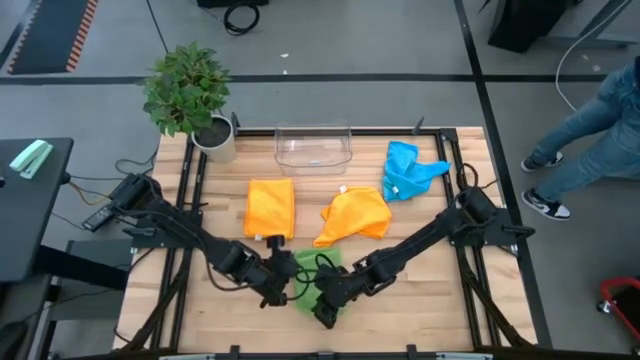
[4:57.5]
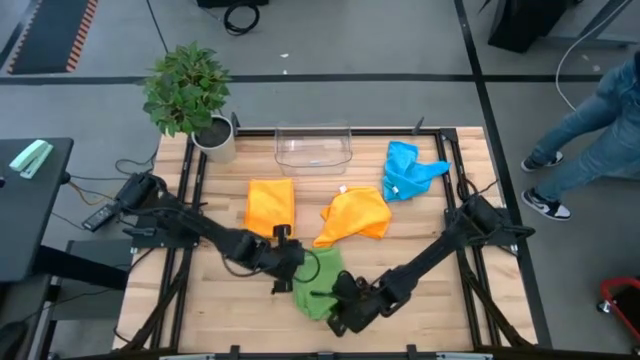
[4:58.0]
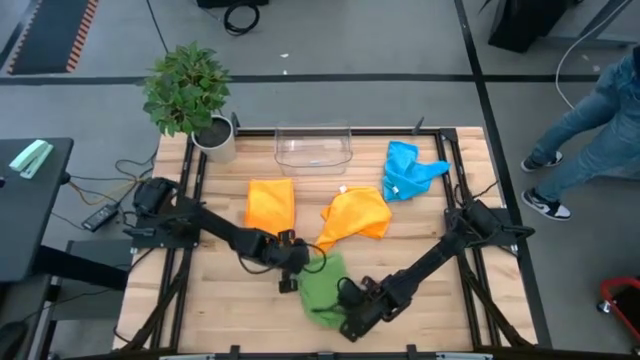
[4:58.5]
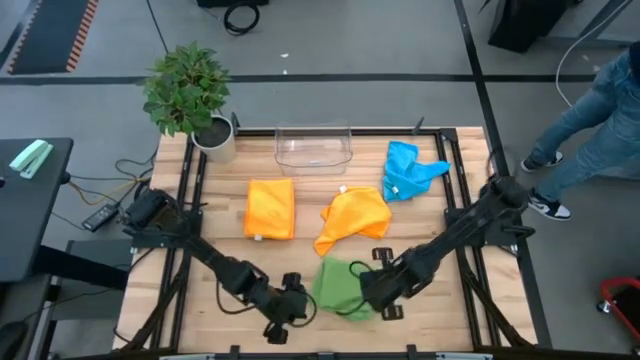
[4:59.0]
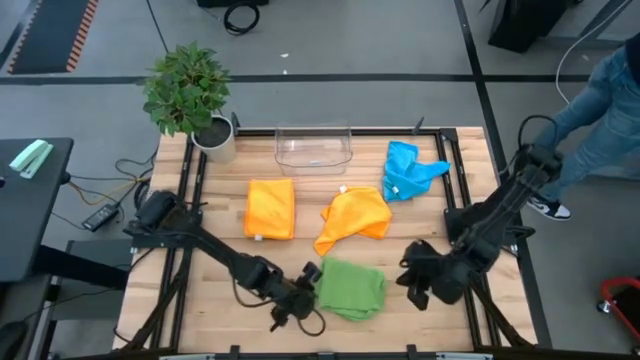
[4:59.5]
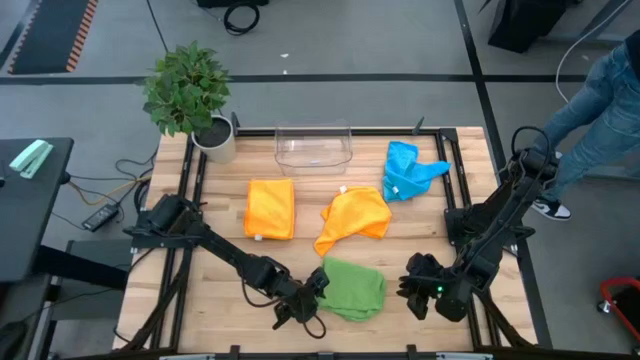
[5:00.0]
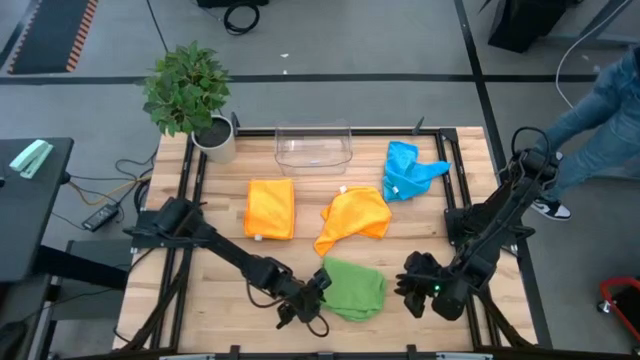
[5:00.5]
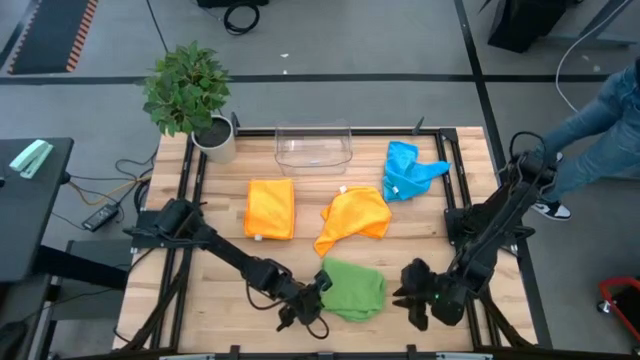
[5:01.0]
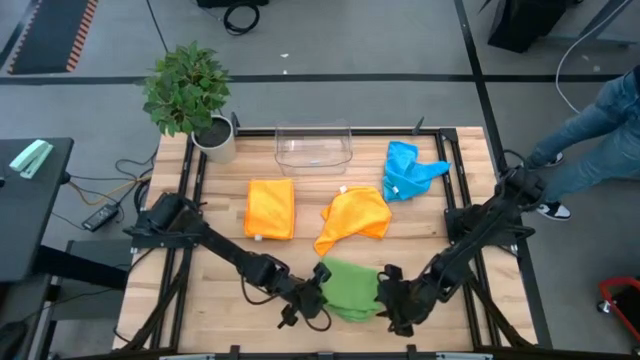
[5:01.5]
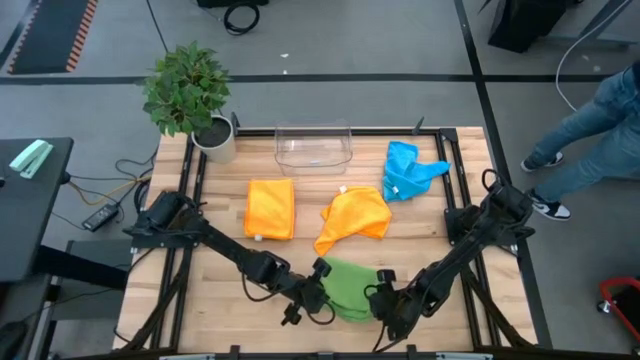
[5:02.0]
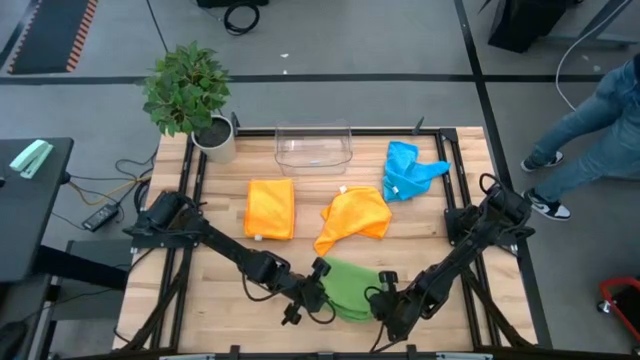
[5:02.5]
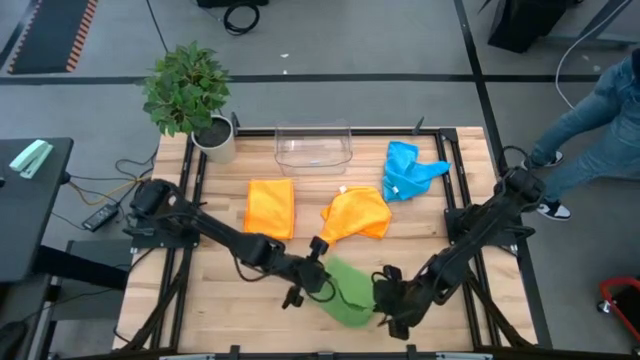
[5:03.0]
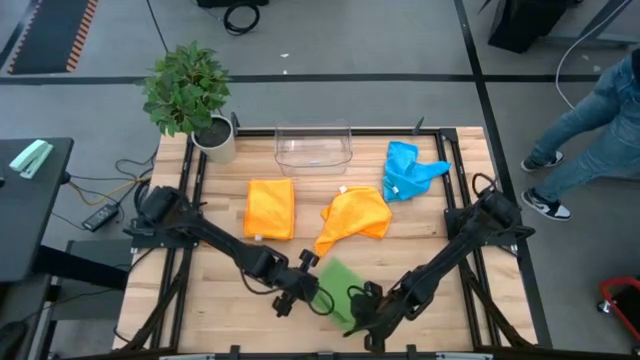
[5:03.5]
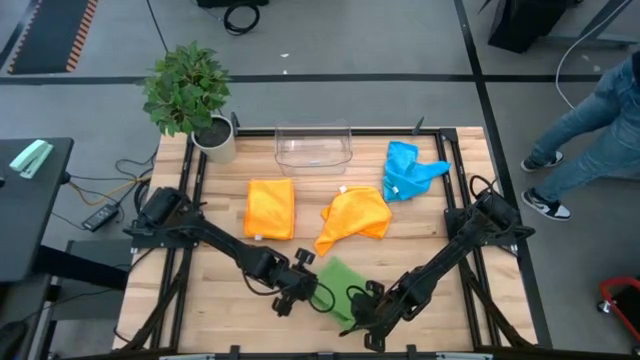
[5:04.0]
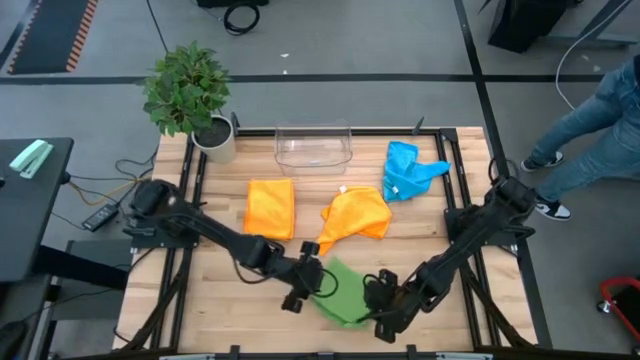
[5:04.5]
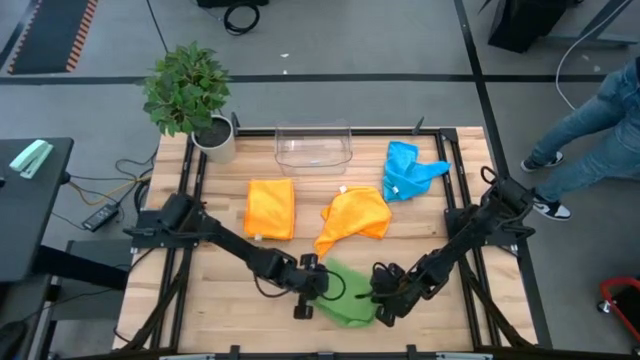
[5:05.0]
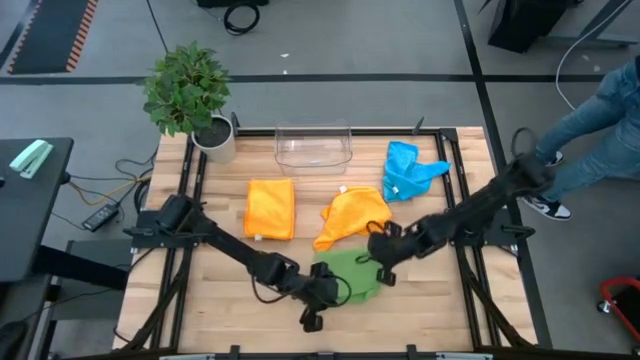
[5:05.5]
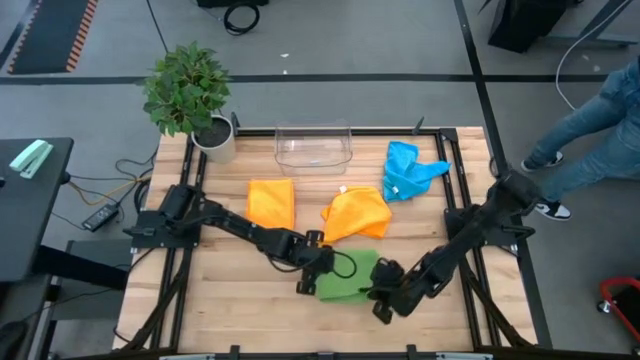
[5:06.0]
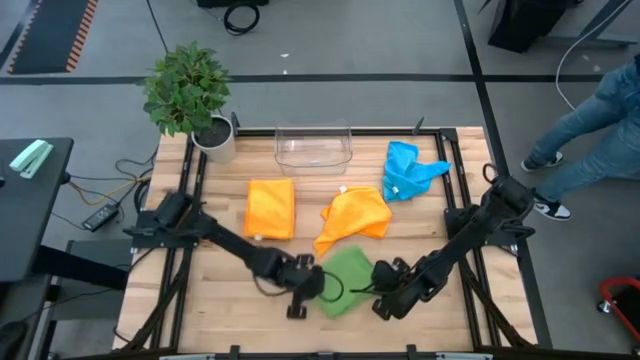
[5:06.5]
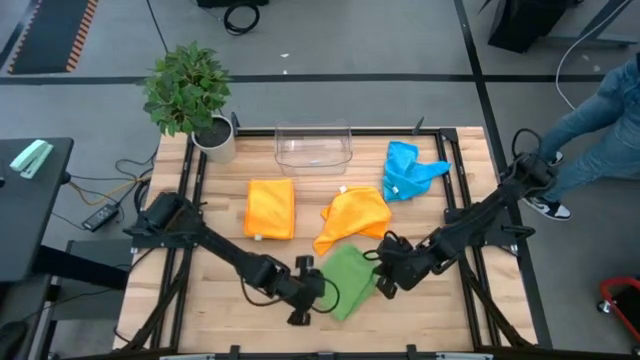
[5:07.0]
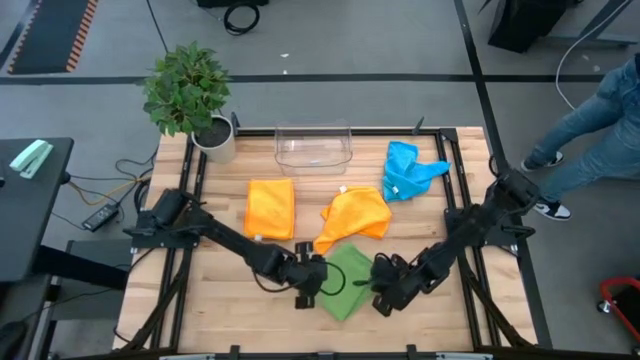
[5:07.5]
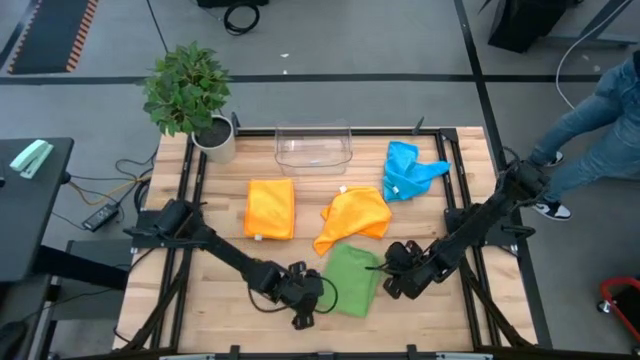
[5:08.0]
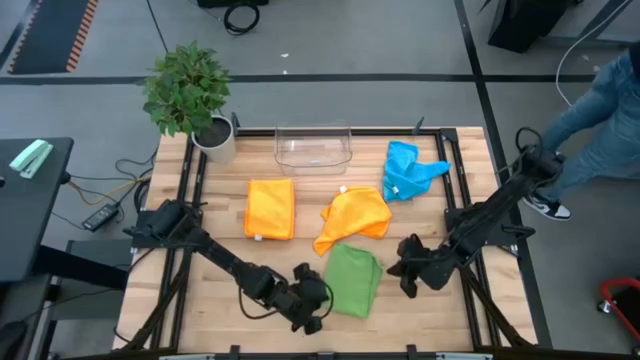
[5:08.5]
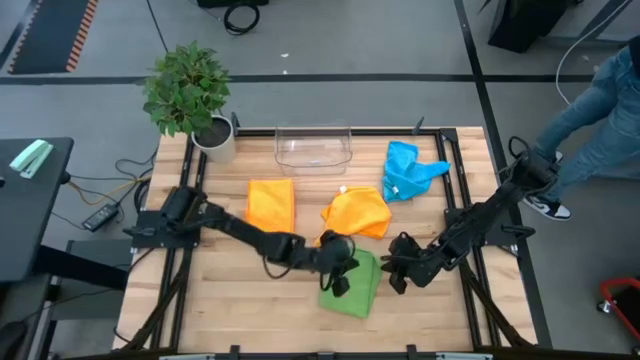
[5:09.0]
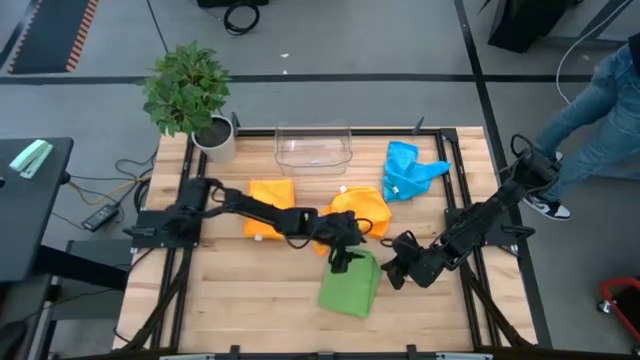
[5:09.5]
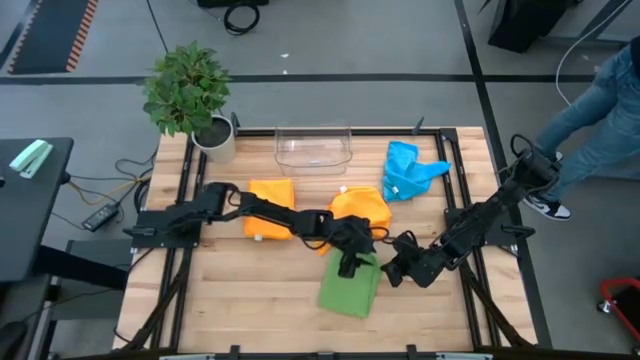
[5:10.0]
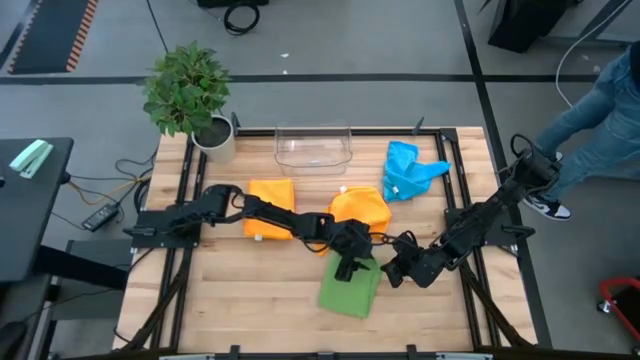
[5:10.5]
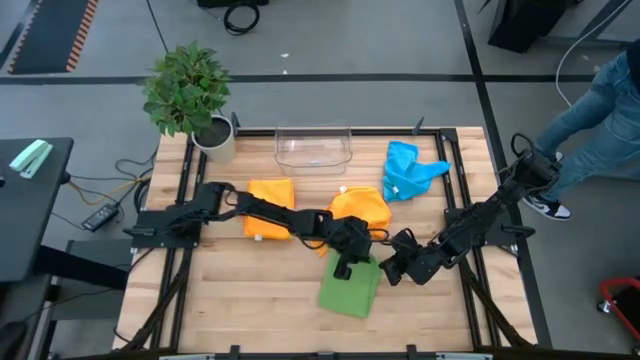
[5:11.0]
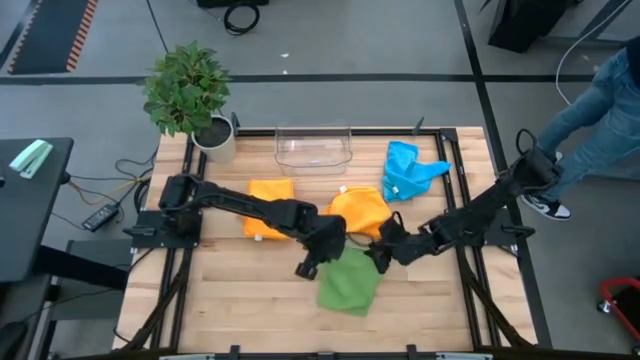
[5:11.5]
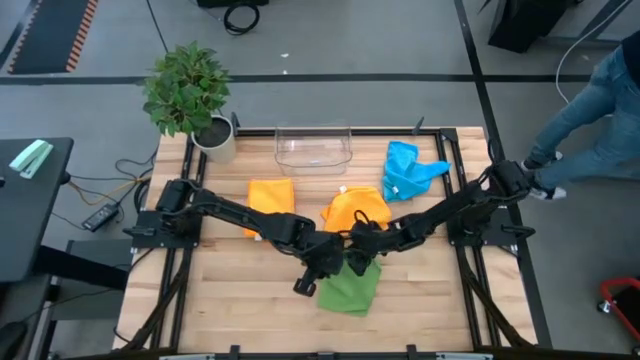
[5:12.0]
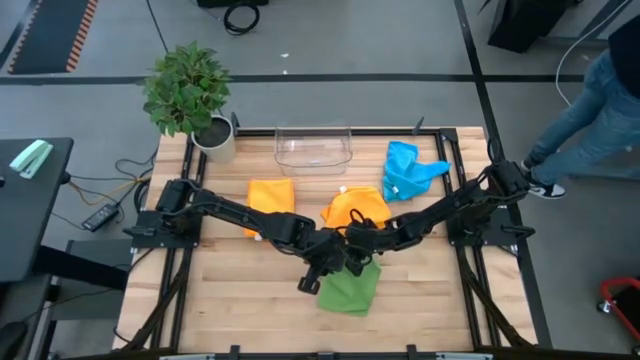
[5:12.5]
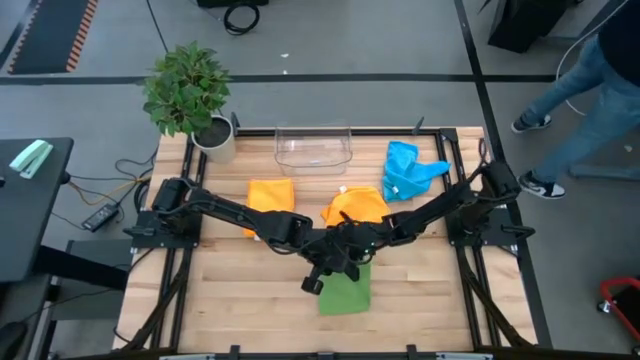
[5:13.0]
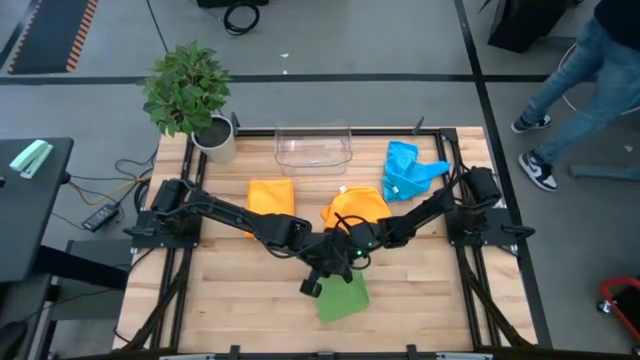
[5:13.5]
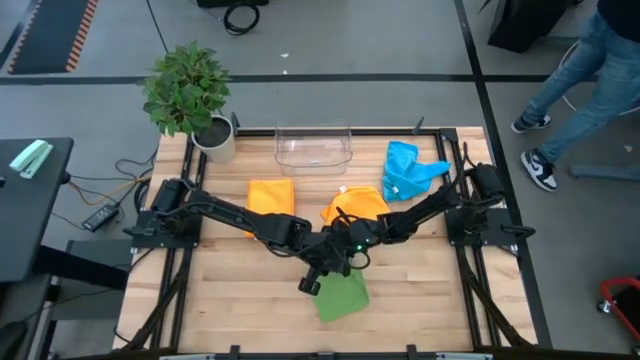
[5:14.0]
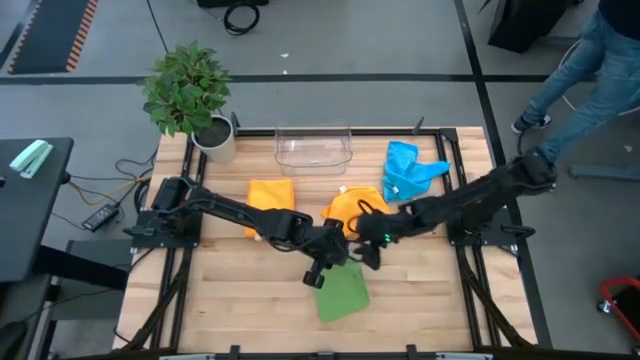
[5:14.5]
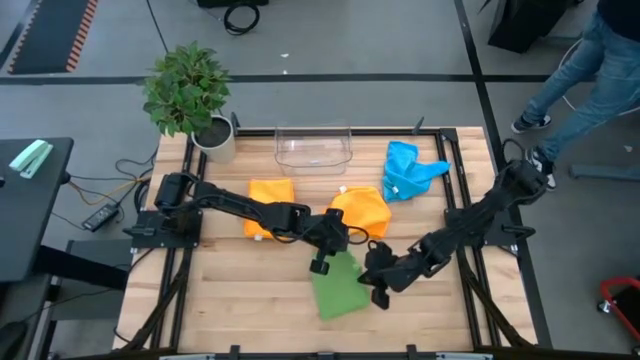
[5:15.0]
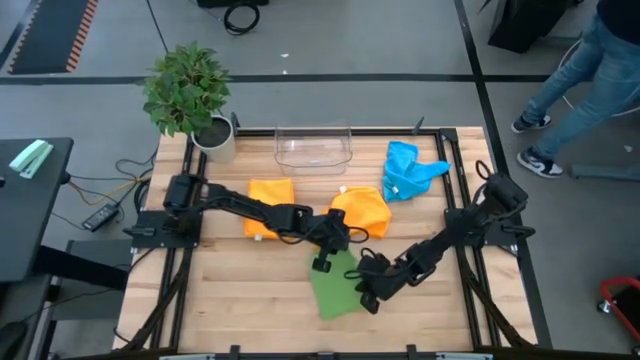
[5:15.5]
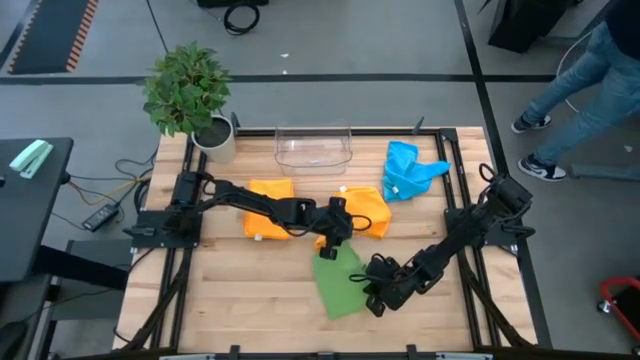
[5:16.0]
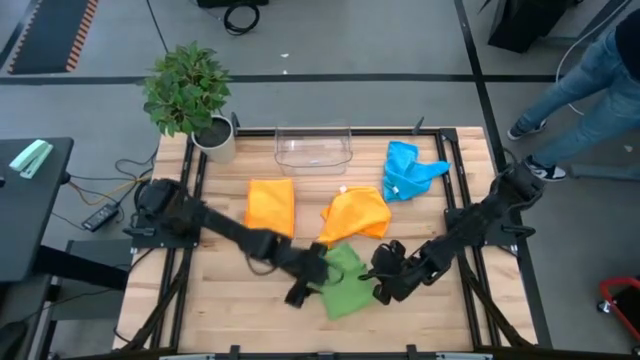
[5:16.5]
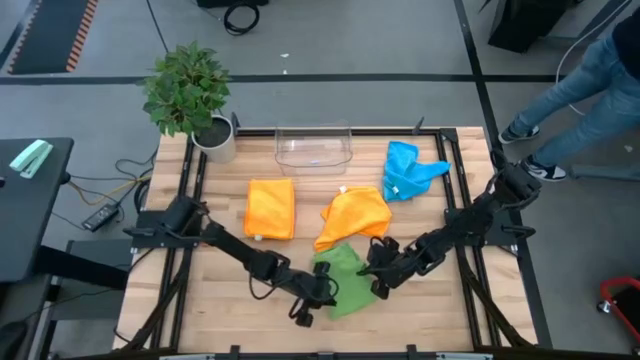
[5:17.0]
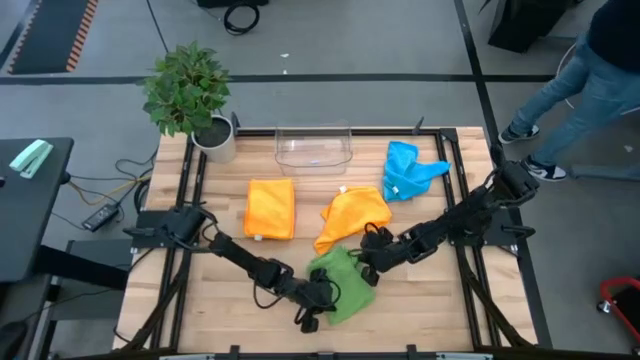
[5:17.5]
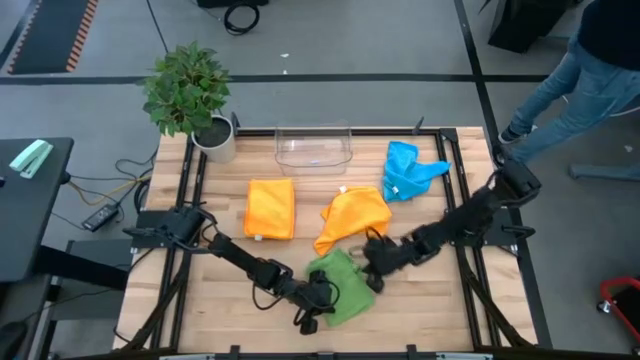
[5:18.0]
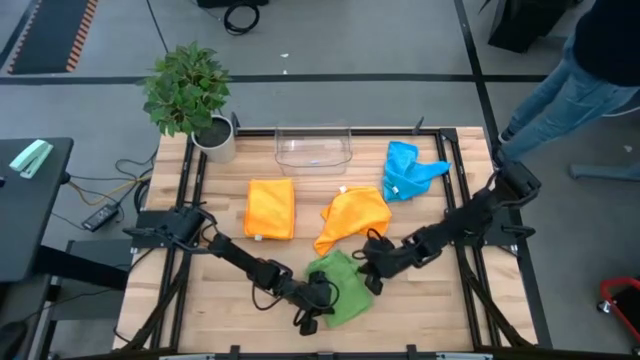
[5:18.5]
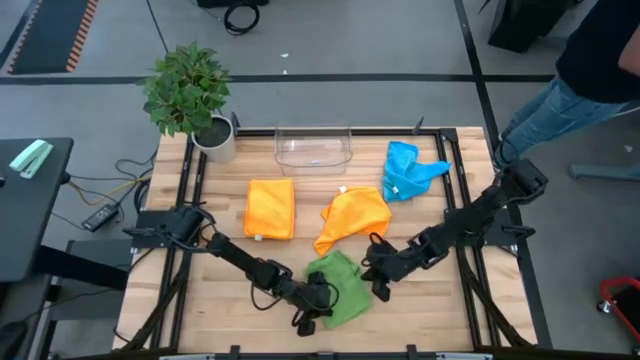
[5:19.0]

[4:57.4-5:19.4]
Task: Fold microfiber towels
Fold the green microfiber cloth
